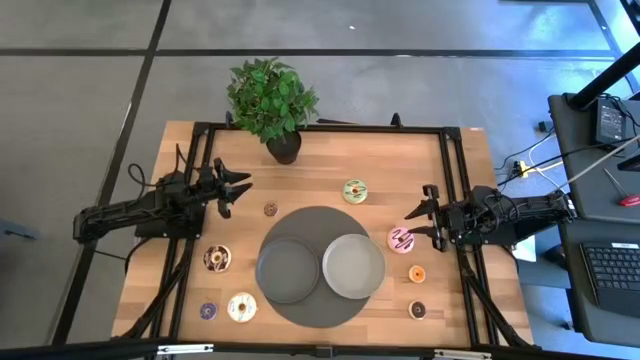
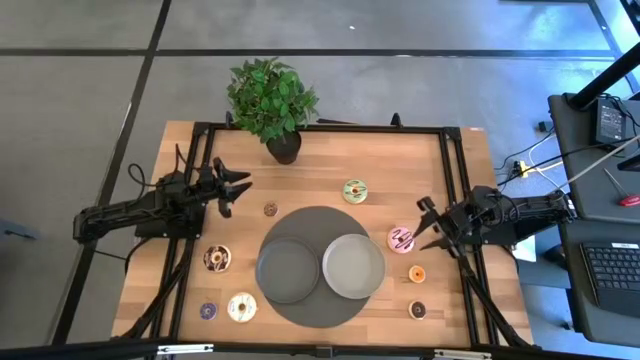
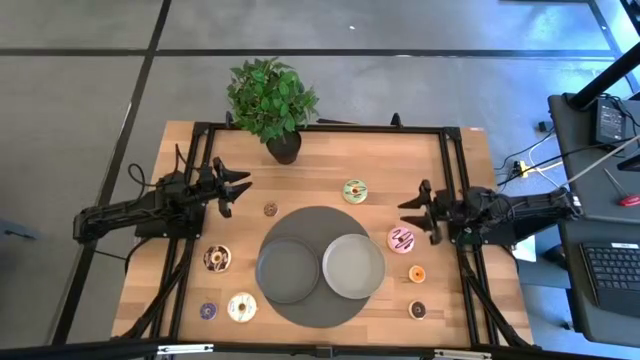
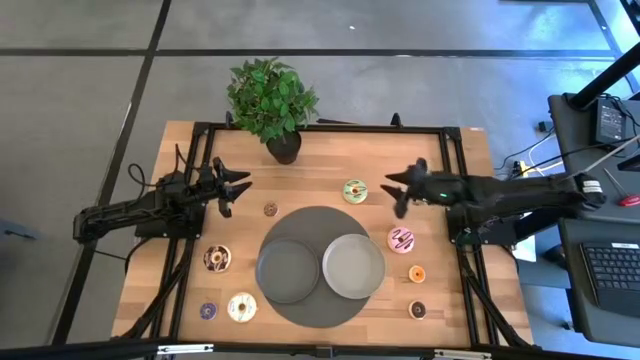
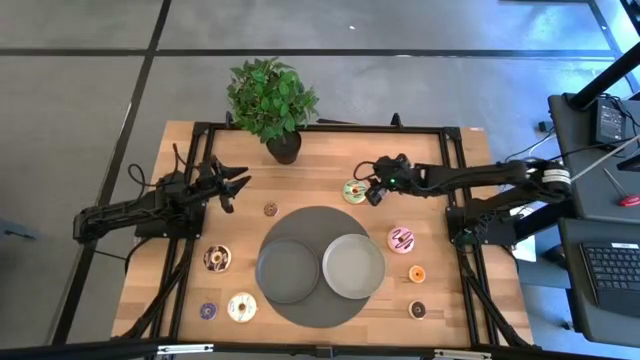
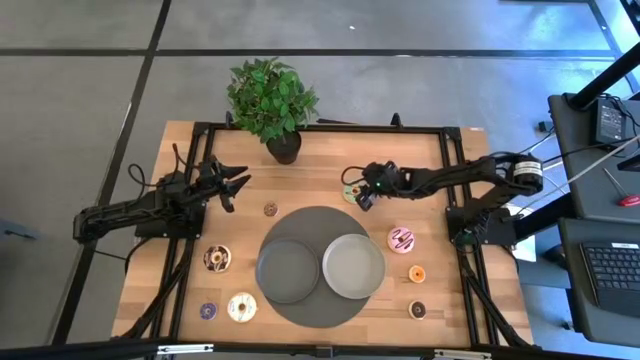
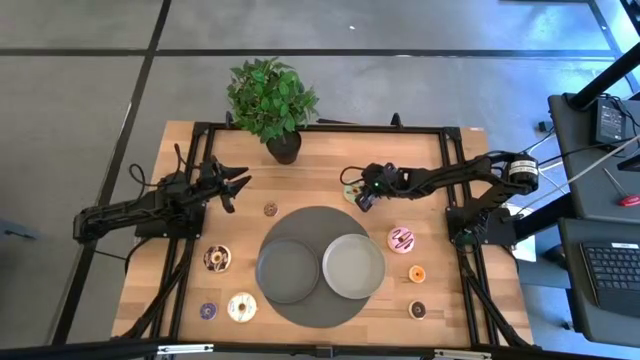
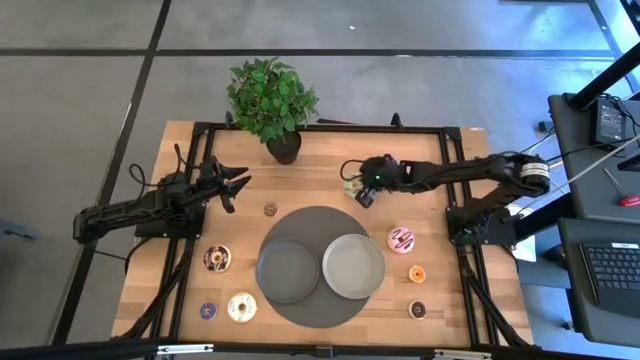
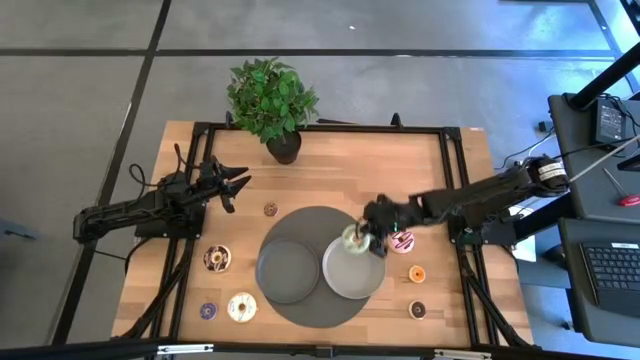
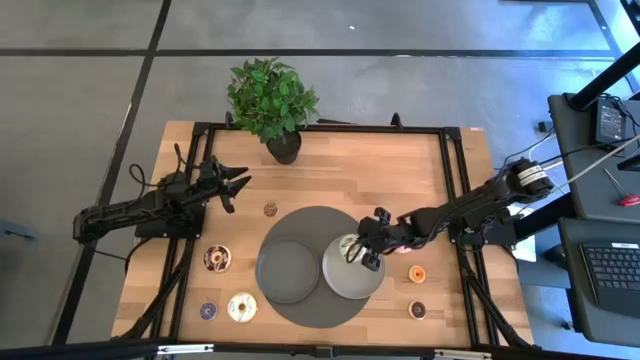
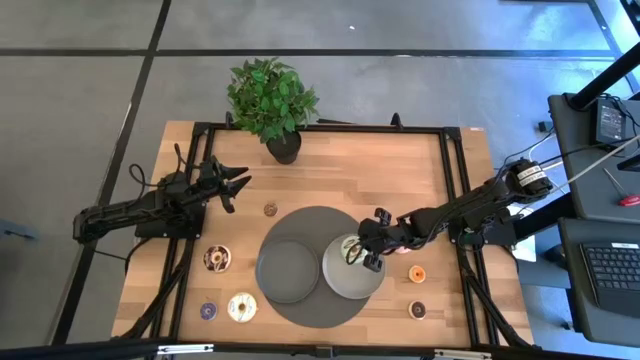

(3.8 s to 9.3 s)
Task: Pick & Place donuts
Put the blue donut on the light gray plate

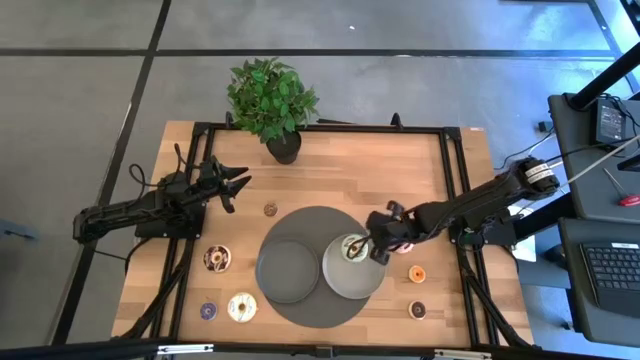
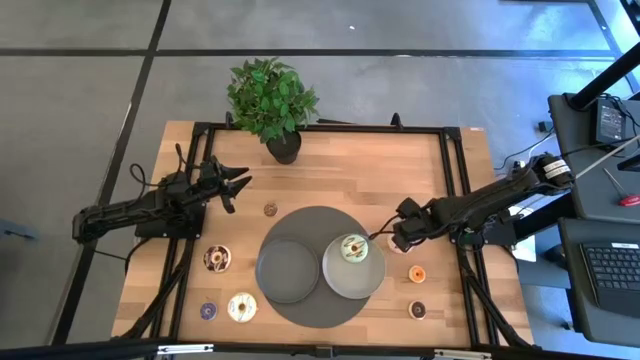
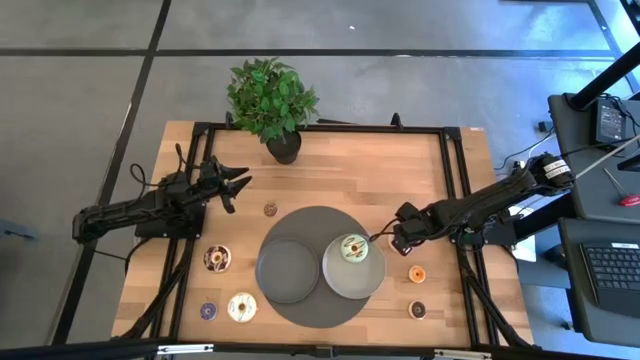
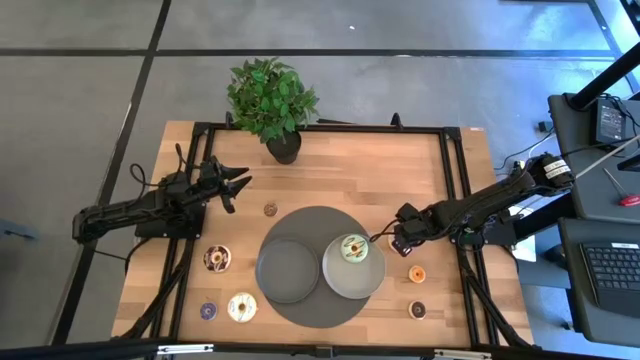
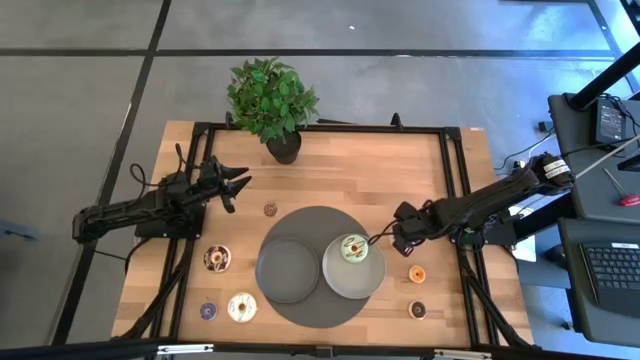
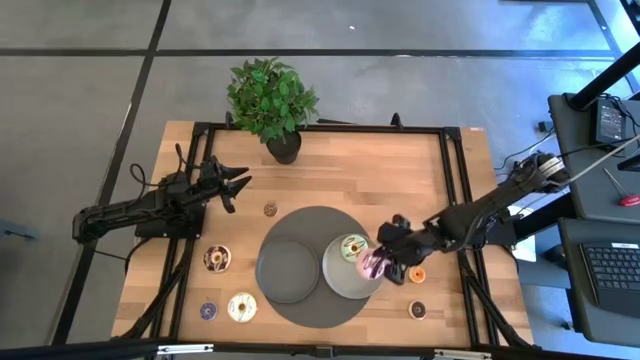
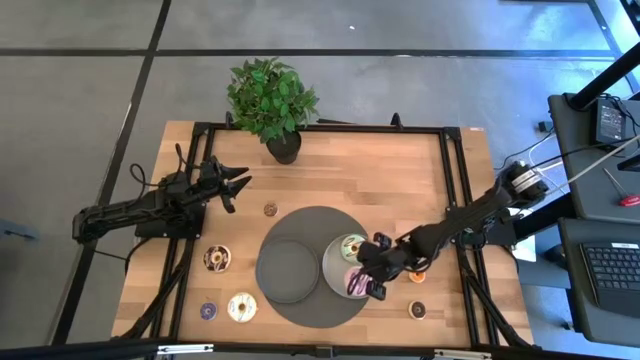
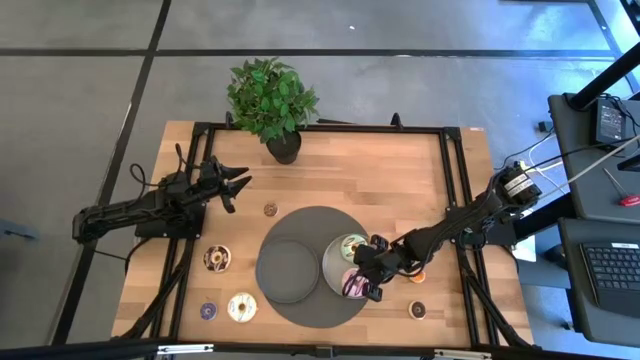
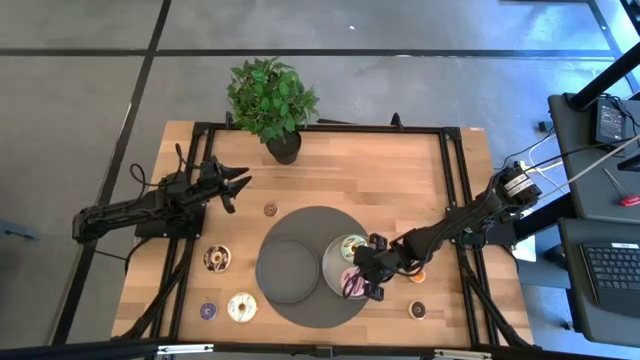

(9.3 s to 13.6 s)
Put the purple donut on the light gray plate

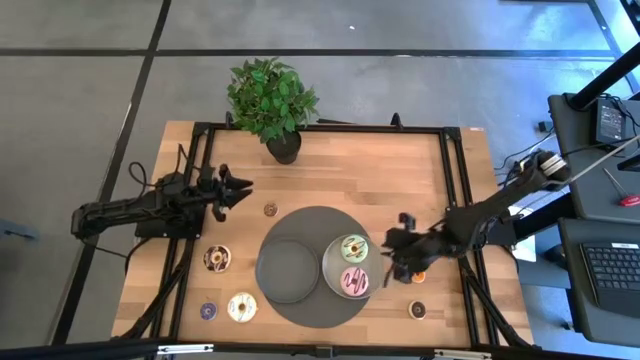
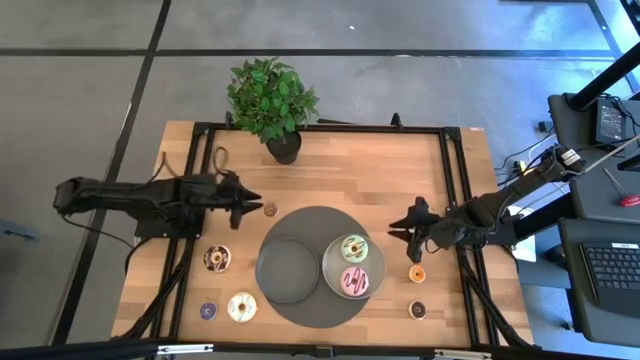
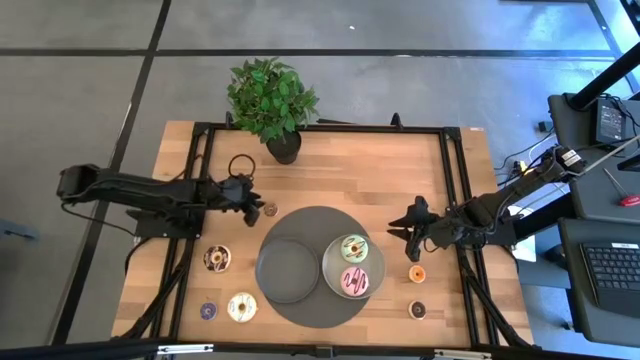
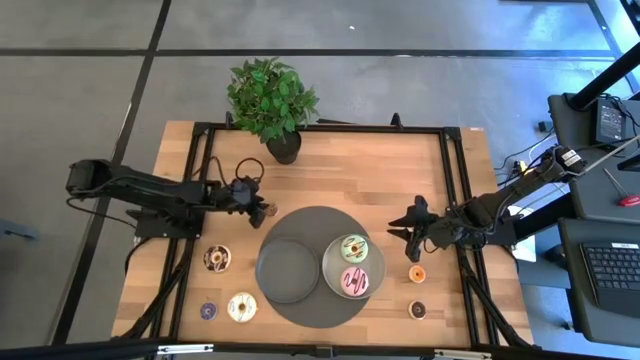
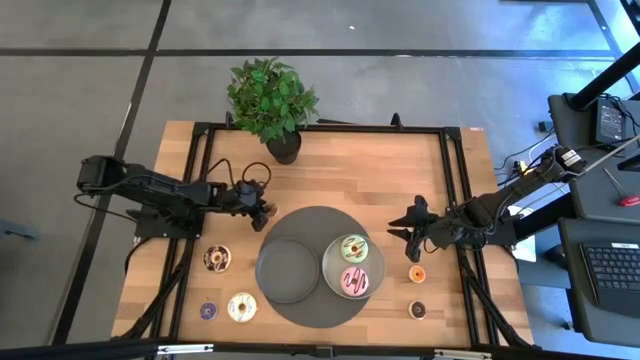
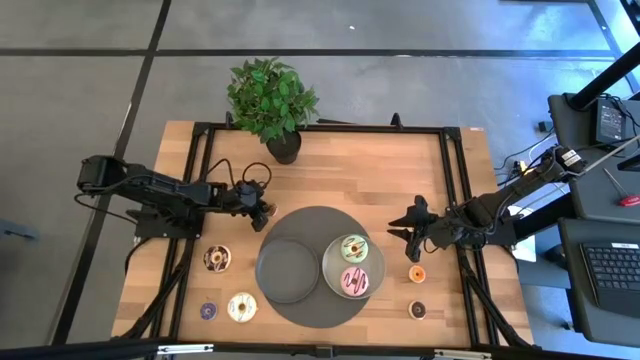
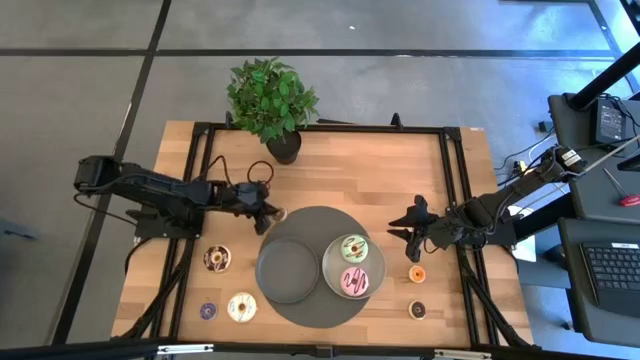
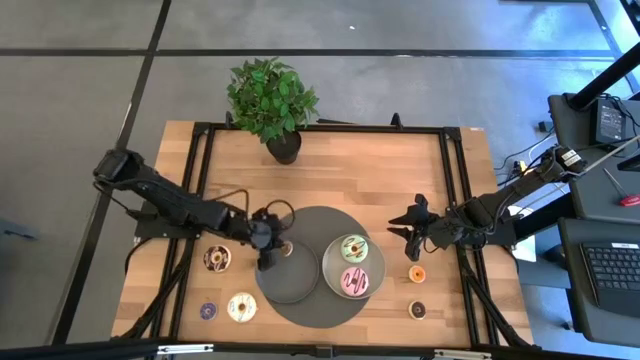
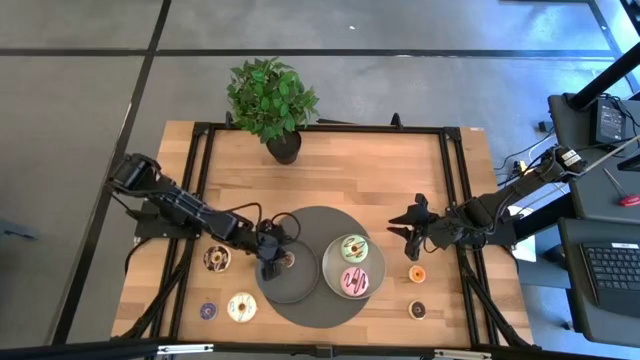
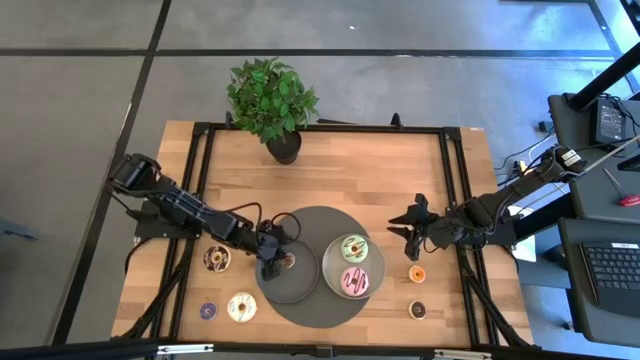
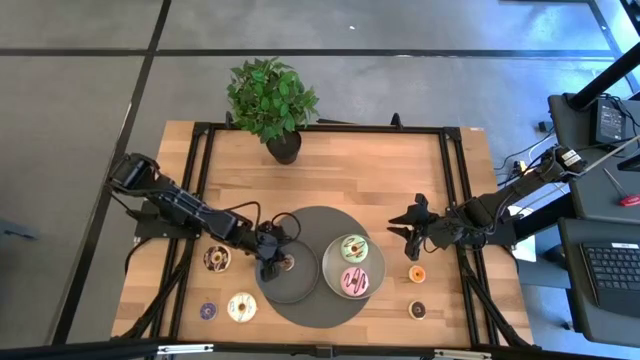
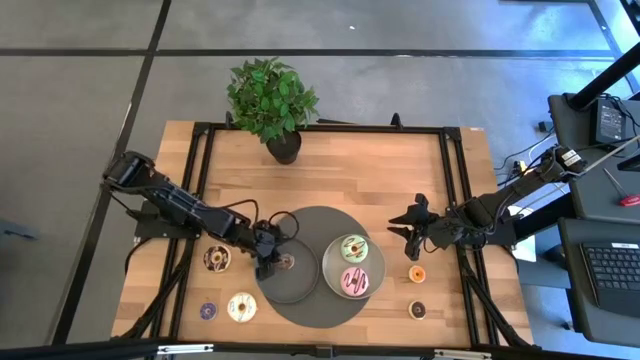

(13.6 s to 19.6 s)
Put the brown donut on the dark gray plate

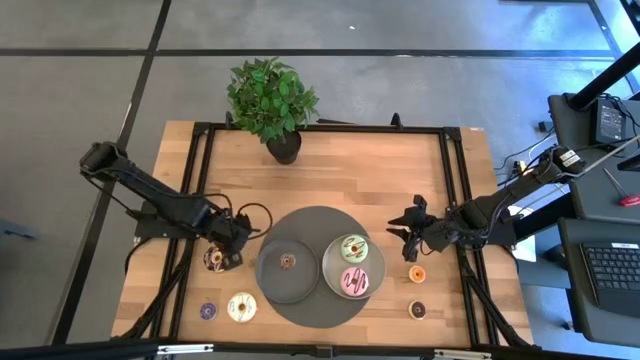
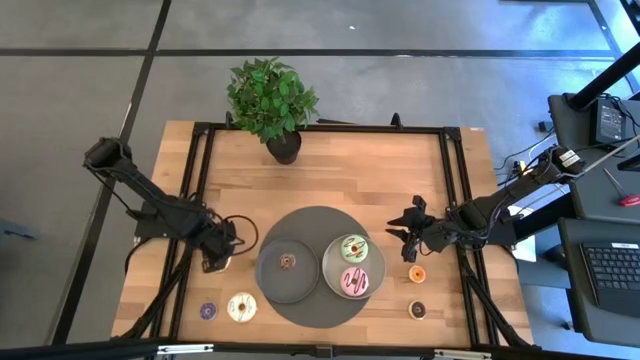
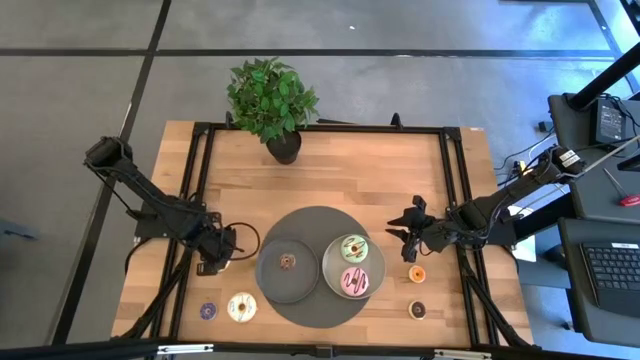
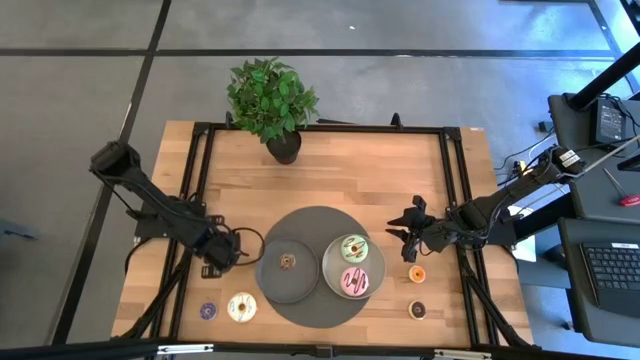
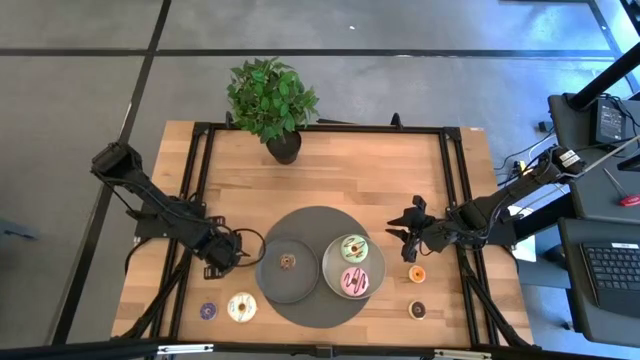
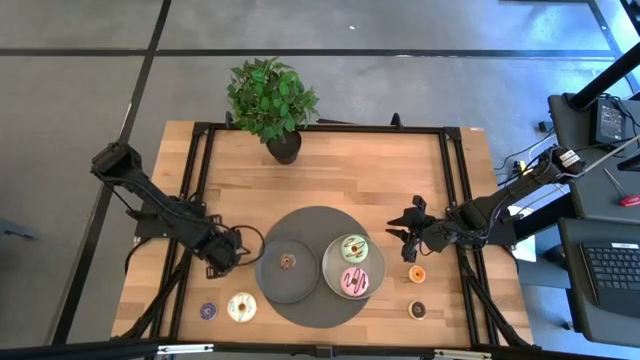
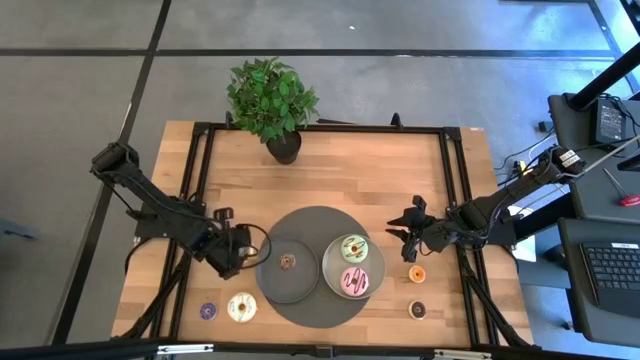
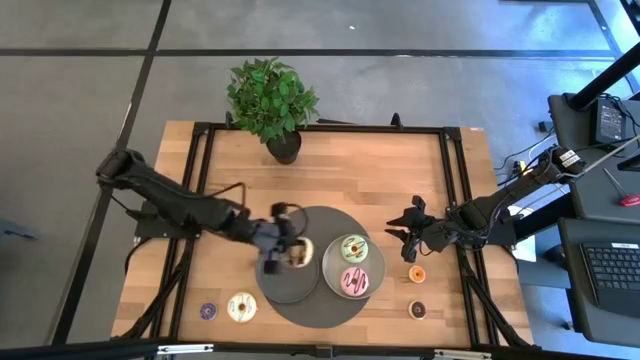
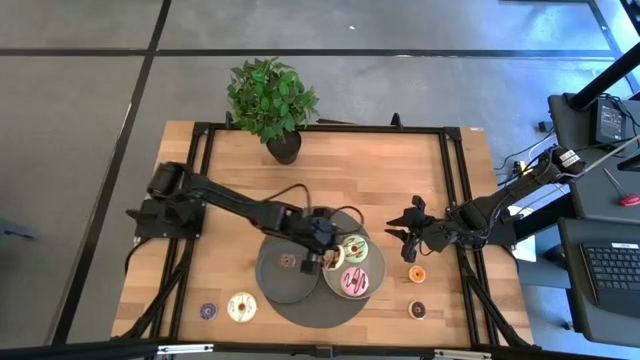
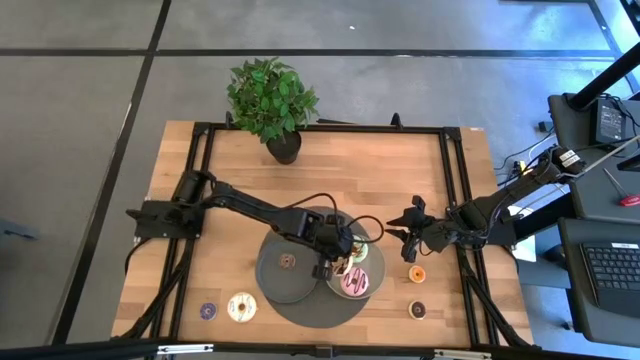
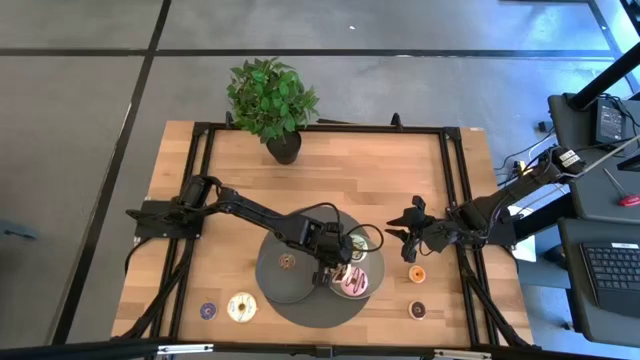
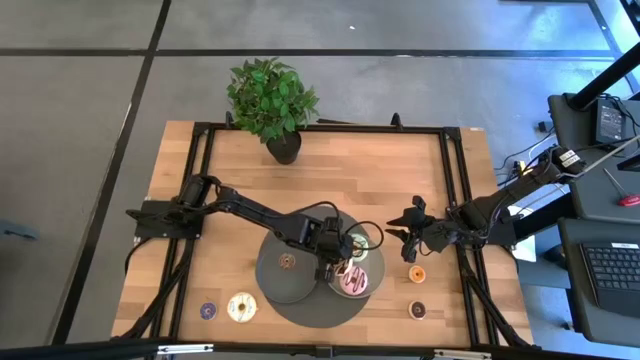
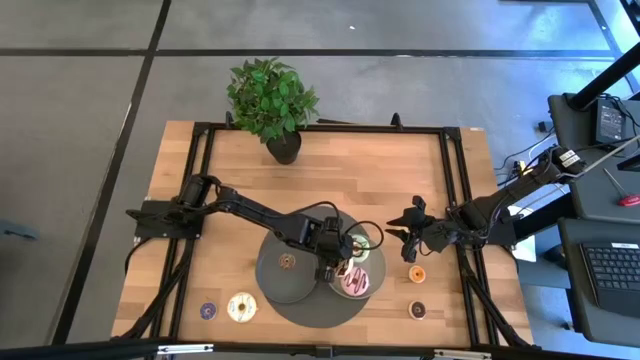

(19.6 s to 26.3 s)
Put the black donut on the light gray plate
